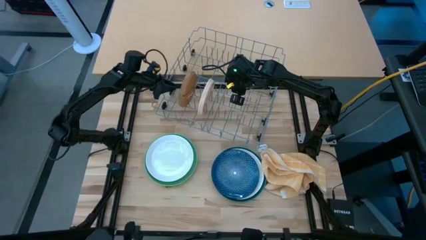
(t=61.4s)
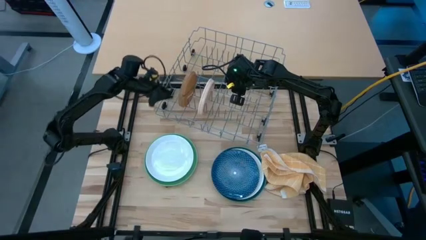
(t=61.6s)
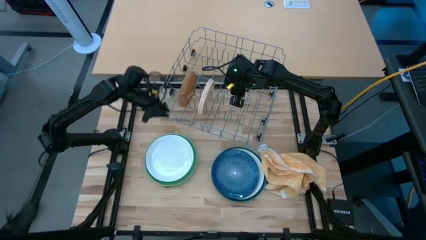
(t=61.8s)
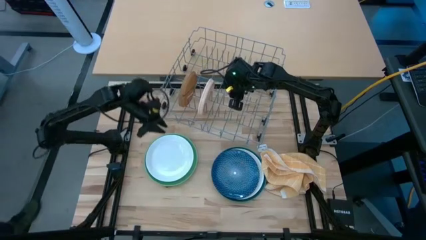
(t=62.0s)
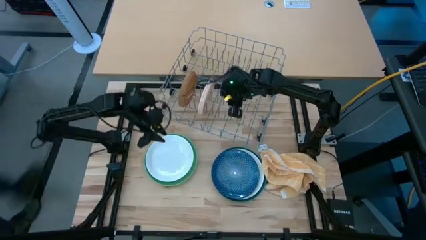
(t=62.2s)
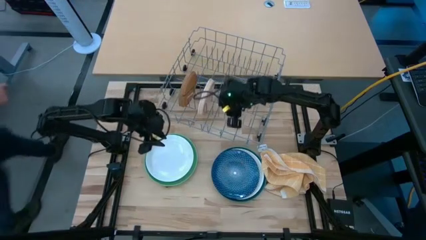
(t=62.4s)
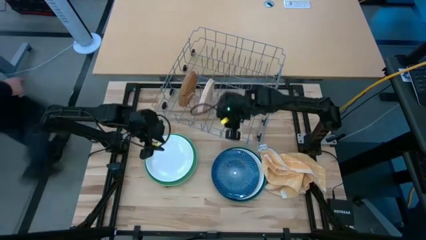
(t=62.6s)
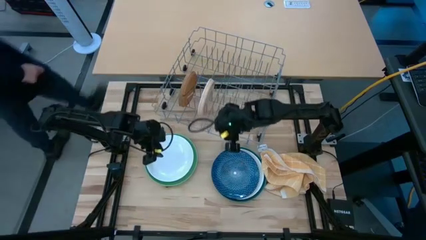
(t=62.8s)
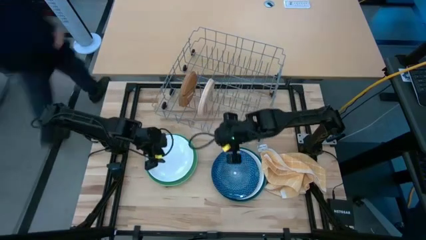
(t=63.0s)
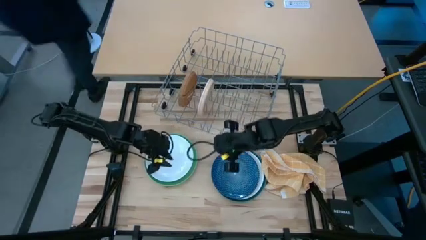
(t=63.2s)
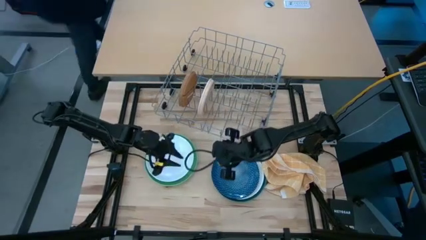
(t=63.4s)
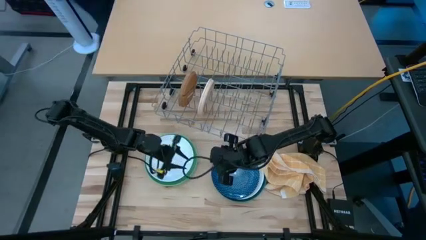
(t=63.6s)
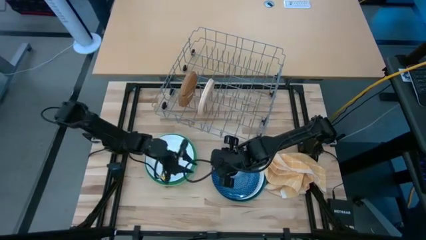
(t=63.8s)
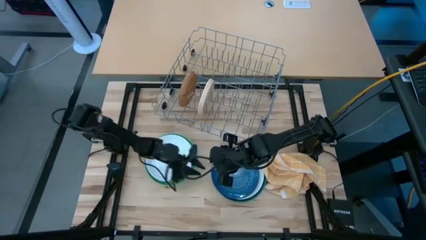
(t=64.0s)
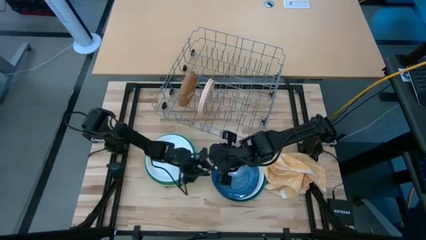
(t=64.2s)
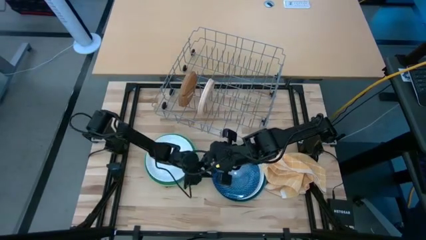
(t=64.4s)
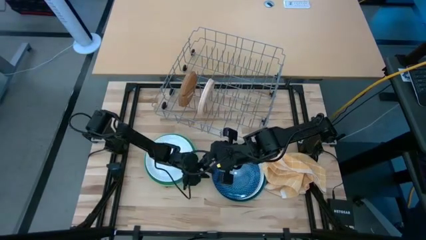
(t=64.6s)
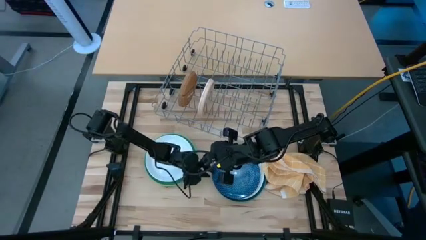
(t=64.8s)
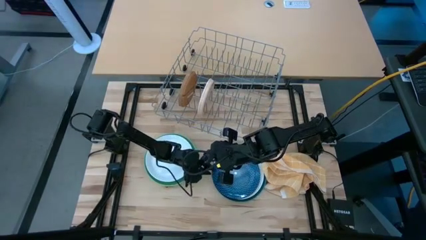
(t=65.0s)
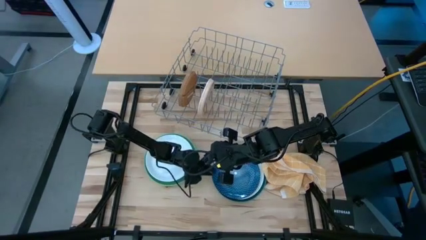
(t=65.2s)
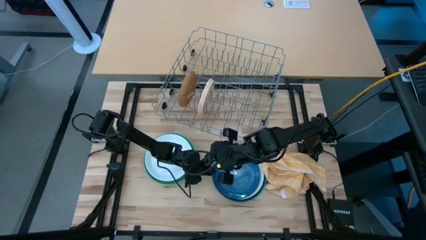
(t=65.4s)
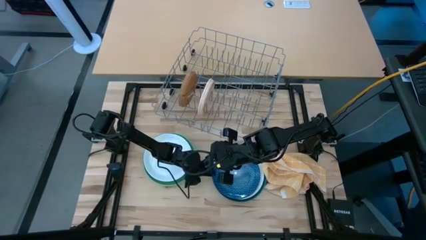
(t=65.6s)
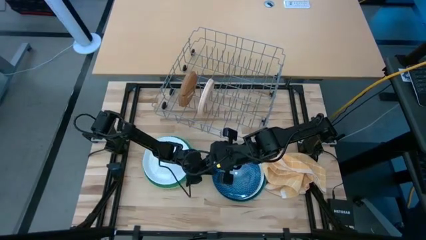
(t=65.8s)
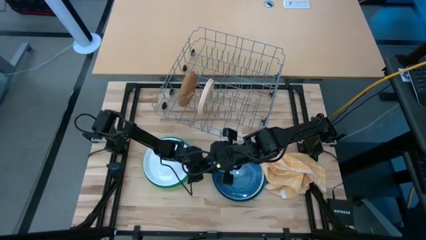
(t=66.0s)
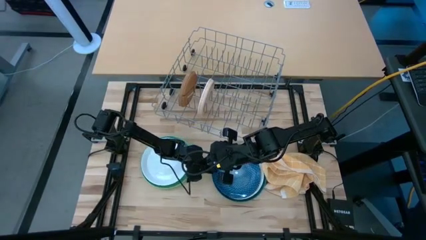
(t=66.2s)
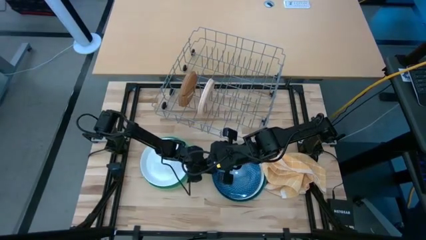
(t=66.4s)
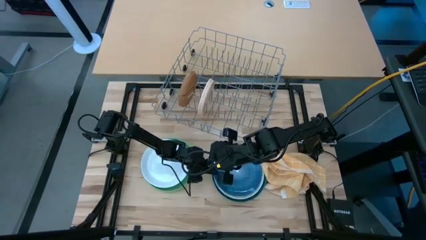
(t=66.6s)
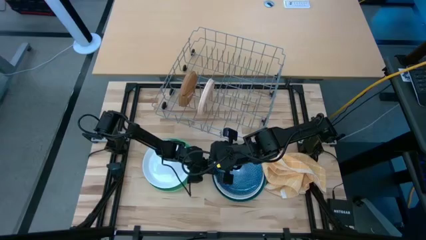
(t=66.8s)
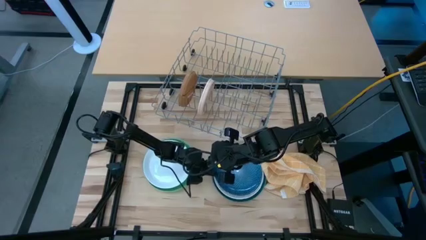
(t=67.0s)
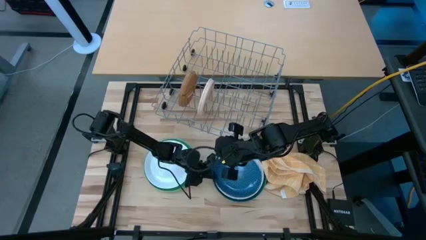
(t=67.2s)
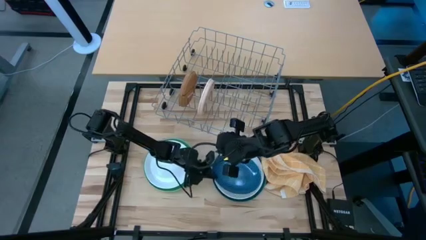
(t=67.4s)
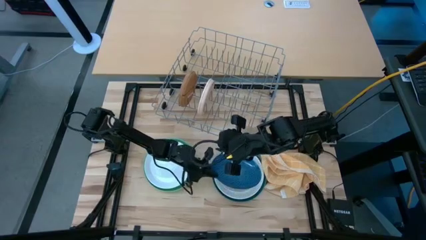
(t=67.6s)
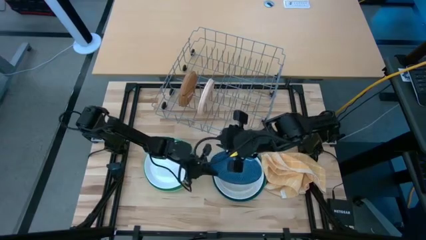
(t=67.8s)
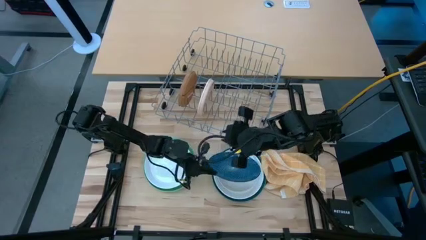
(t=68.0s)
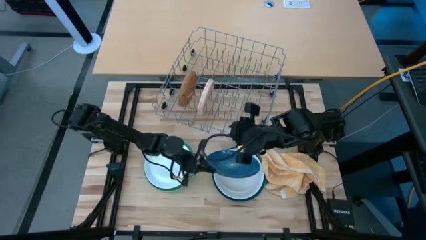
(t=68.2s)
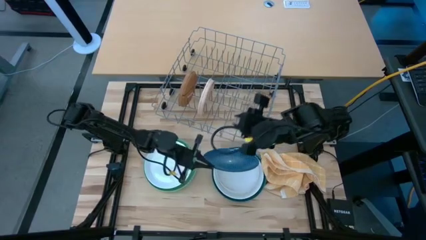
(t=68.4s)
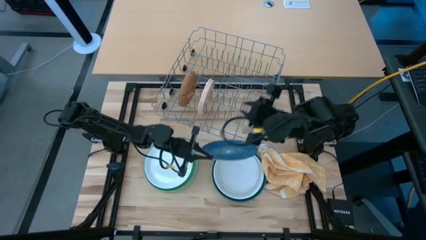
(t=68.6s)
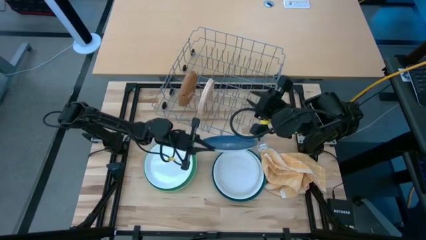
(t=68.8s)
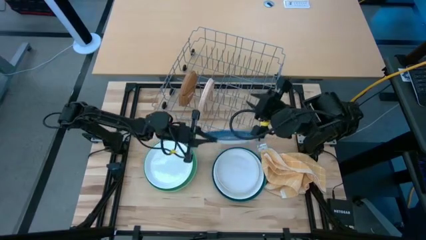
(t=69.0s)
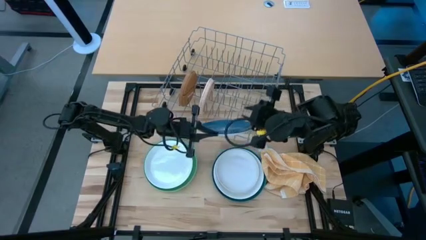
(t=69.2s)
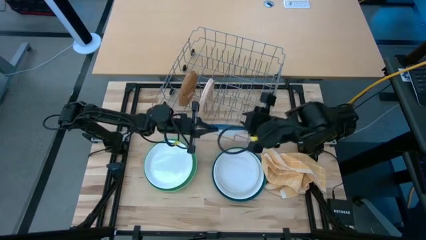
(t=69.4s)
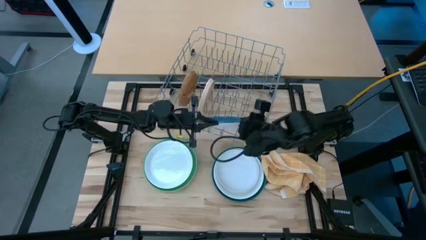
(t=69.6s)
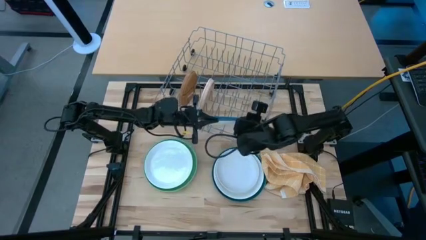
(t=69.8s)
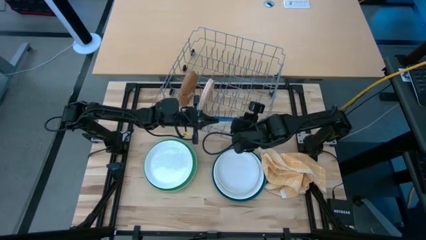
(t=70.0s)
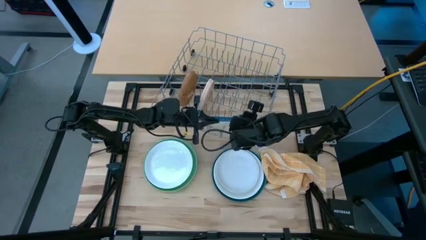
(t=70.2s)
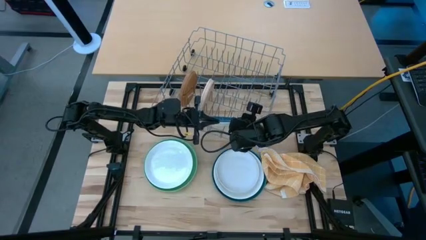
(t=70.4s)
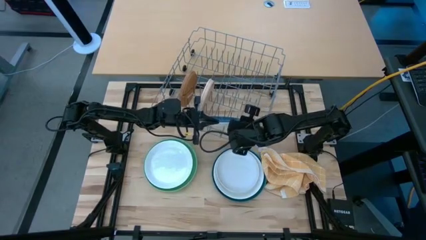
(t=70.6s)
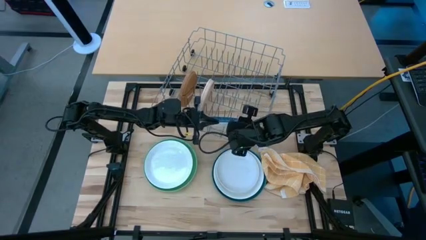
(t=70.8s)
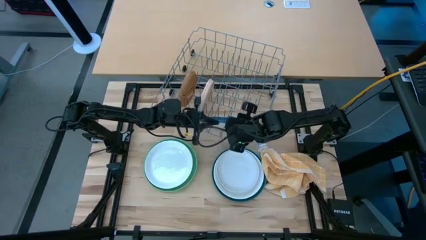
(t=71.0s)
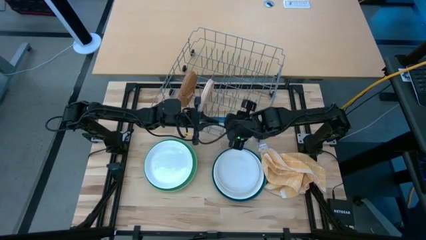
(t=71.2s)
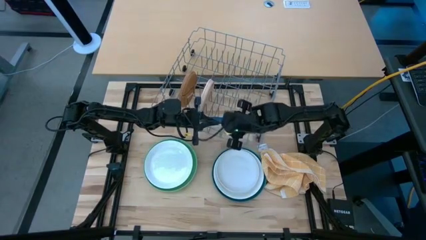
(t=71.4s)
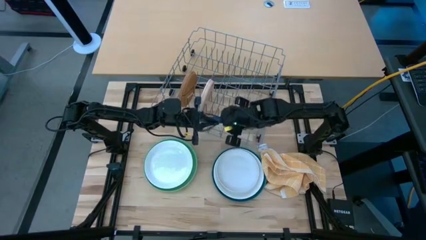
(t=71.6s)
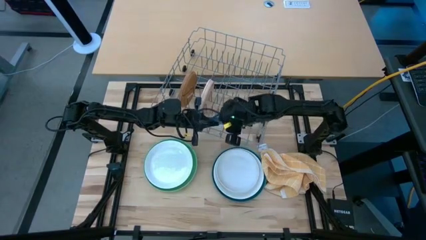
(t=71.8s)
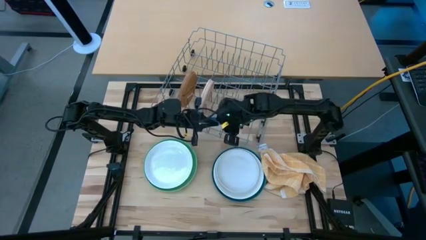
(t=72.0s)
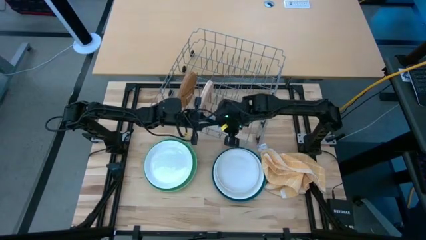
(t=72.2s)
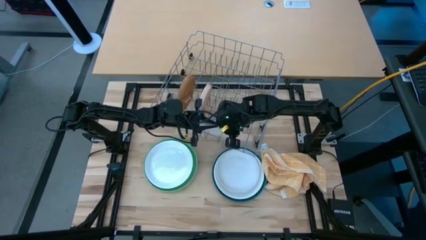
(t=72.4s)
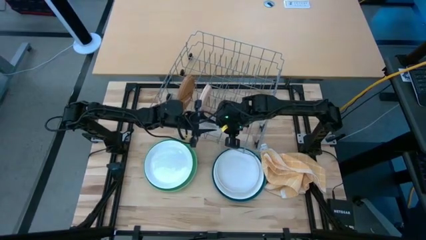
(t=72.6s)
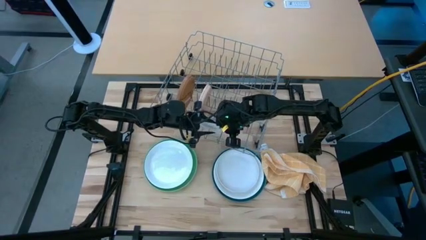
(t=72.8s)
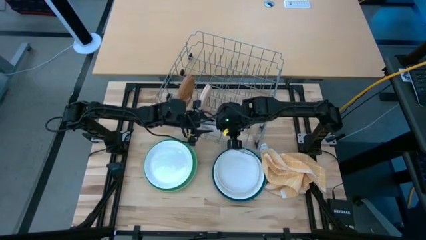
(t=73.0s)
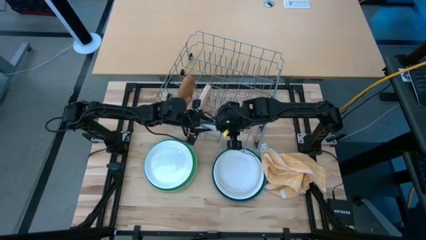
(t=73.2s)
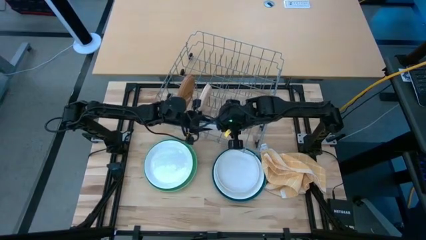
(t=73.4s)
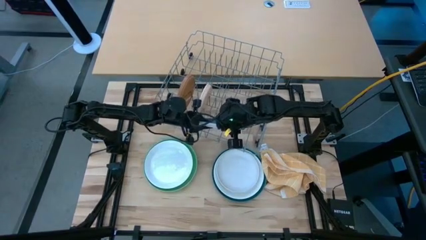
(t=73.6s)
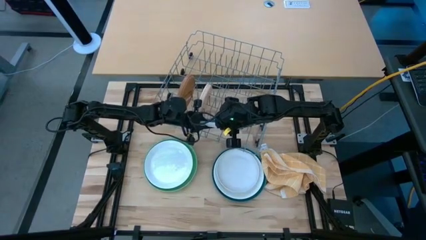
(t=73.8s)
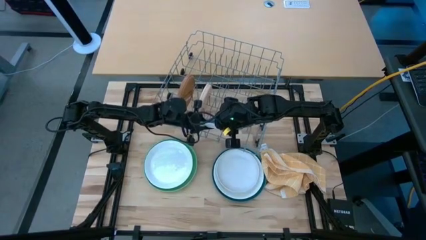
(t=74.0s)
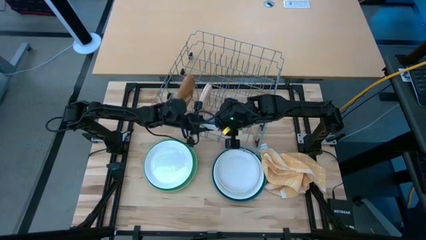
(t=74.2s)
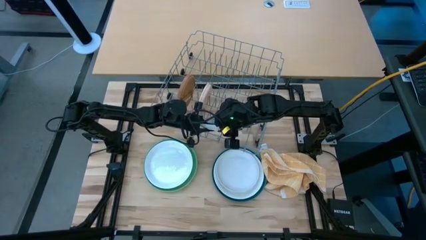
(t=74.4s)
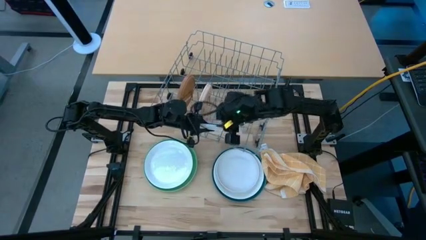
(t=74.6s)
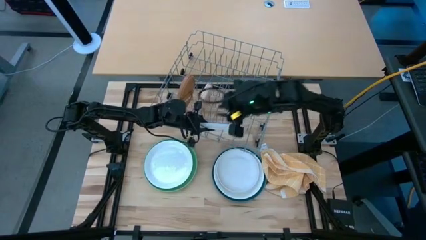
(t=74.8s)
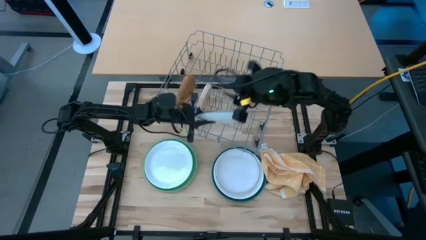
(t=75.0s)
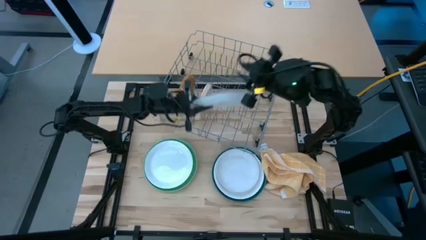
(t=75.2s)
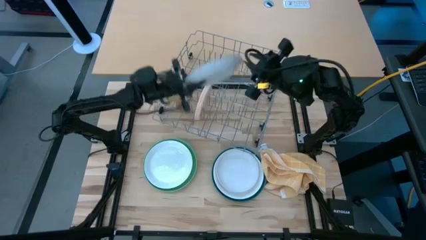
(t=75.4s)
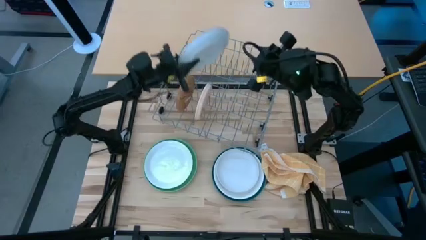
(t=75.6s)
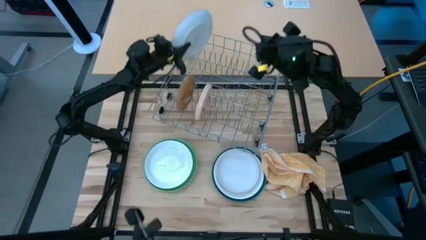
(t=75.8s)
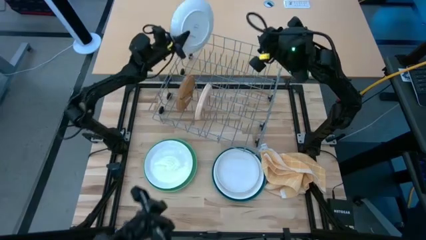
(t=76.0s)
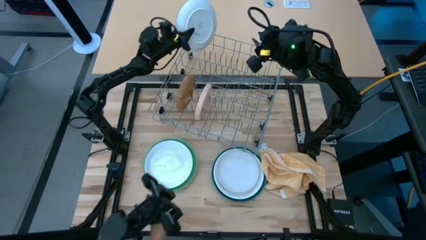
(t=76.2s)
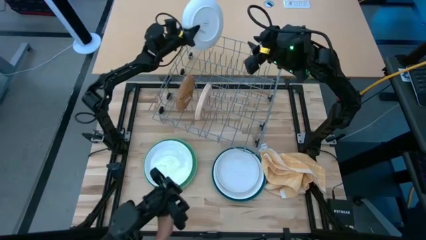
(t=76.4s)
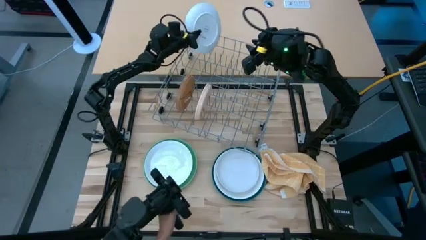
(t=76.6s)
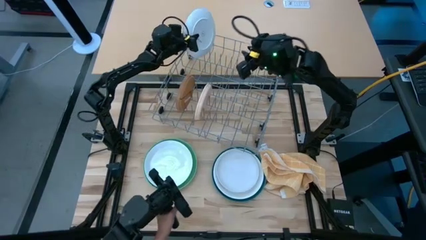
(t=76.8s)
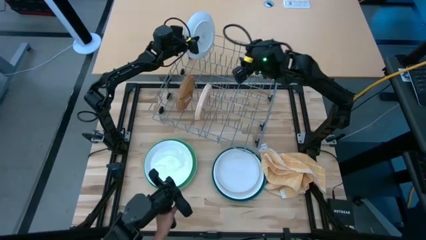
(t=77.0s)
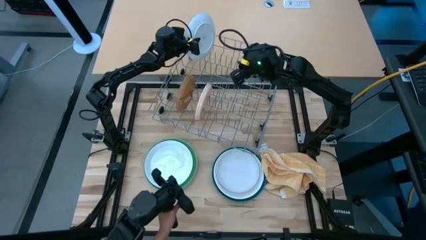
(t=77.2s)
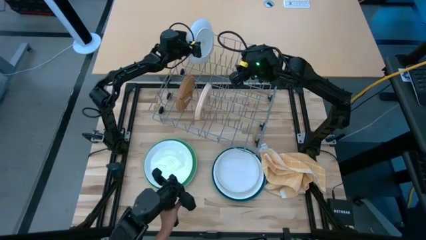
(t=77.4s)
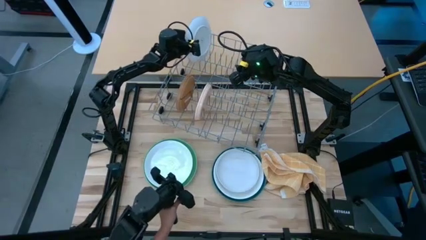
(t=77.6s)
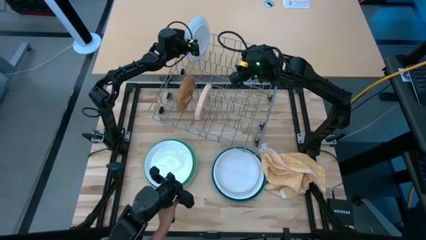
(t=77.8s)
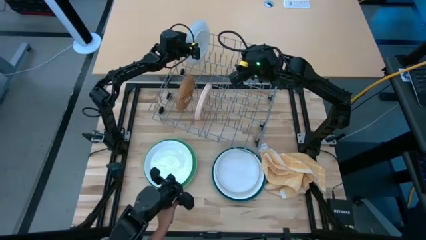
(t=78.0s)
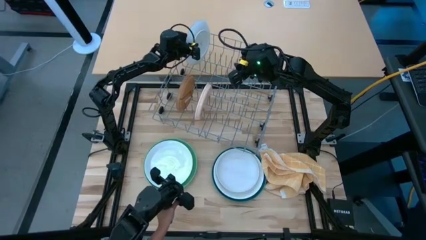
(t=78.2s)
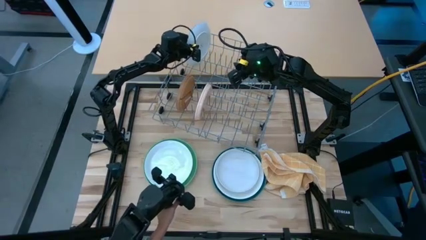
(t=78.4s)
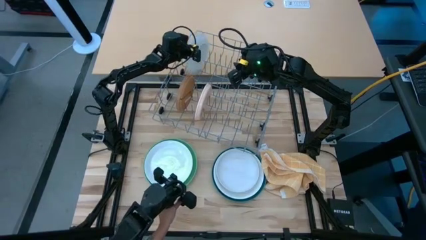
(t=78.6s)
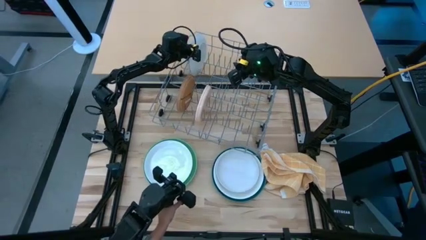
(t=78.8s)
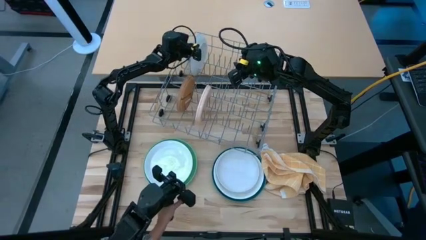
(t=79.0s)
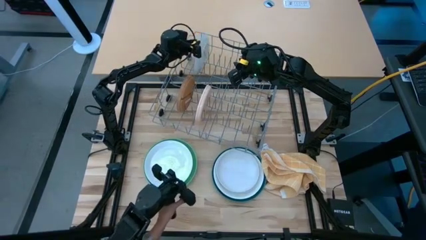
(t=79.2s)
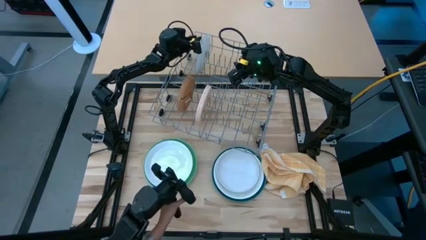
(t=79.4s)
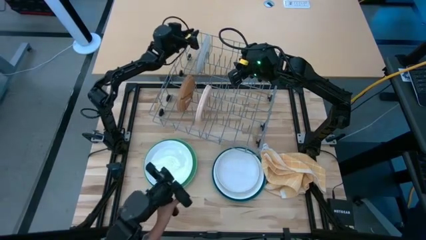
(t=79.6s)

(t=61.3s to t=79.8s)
Task: Sort dishes
Put the blue patterned plate in the dish rack
